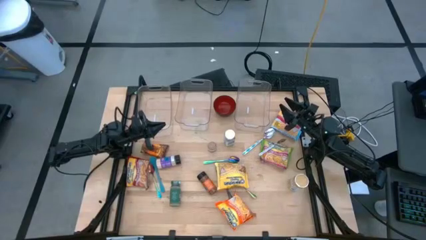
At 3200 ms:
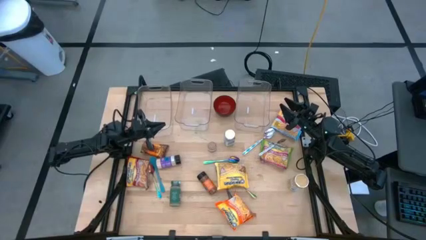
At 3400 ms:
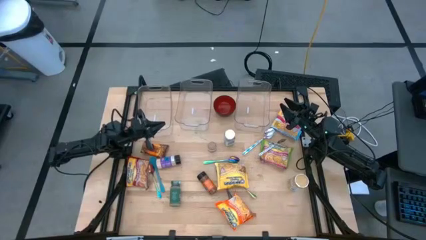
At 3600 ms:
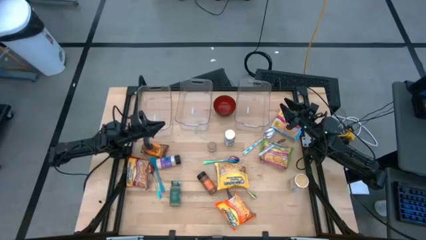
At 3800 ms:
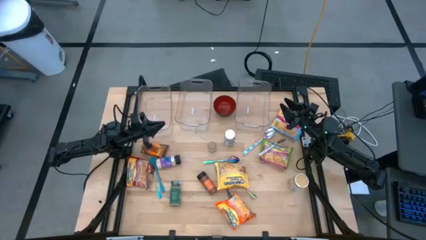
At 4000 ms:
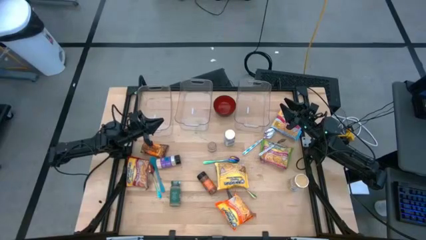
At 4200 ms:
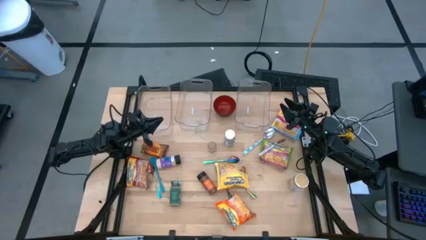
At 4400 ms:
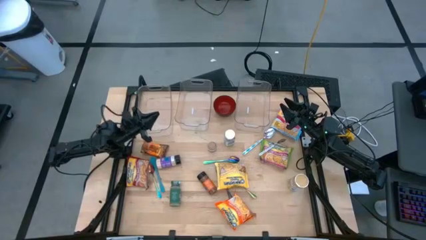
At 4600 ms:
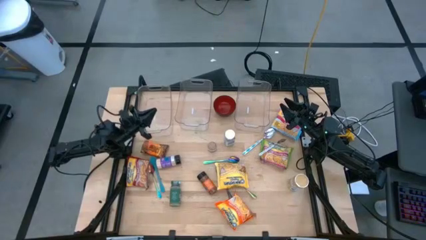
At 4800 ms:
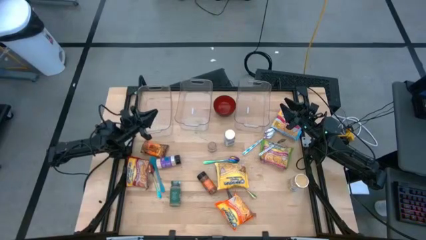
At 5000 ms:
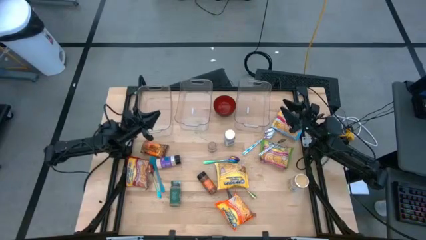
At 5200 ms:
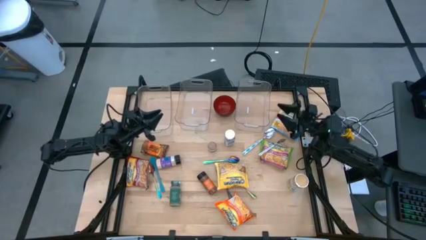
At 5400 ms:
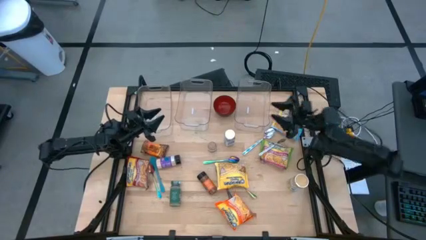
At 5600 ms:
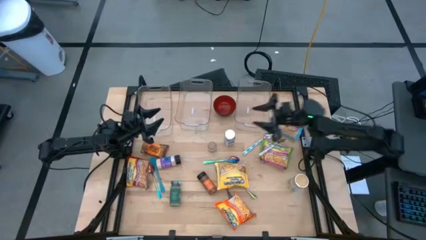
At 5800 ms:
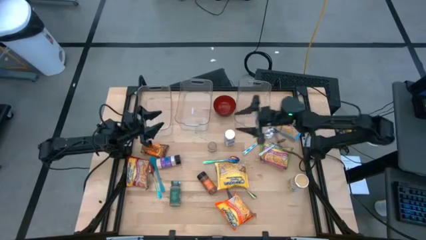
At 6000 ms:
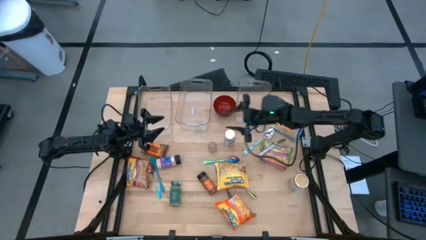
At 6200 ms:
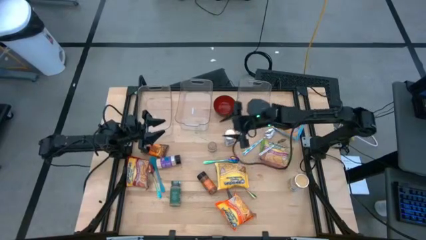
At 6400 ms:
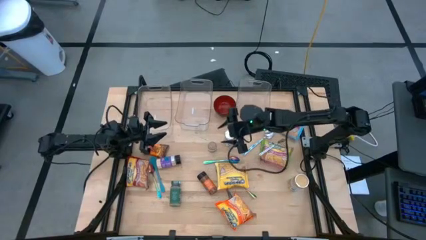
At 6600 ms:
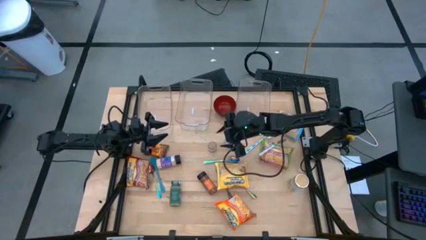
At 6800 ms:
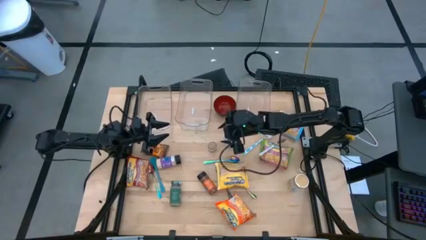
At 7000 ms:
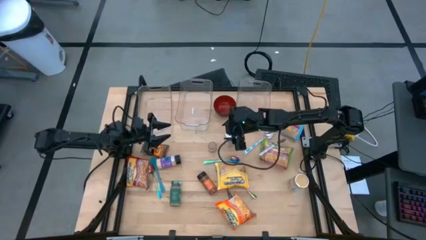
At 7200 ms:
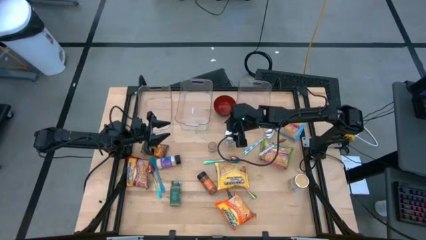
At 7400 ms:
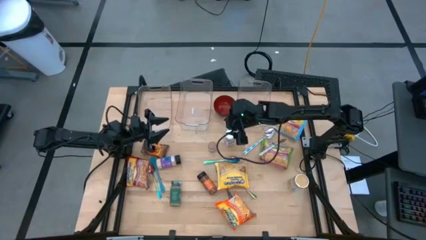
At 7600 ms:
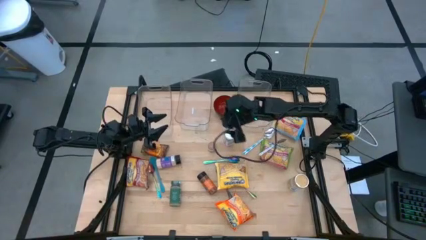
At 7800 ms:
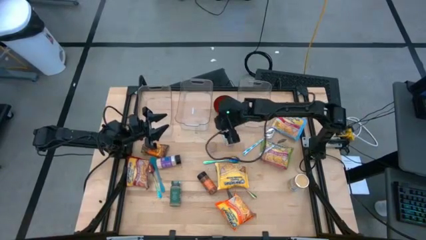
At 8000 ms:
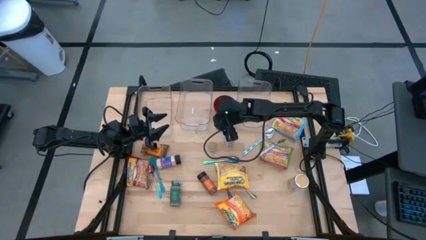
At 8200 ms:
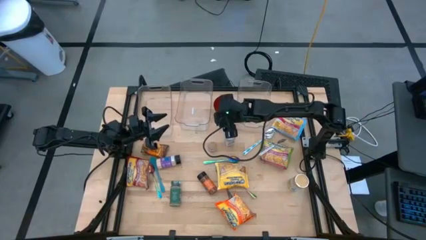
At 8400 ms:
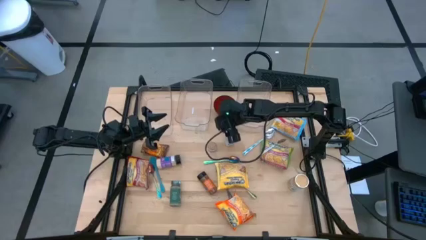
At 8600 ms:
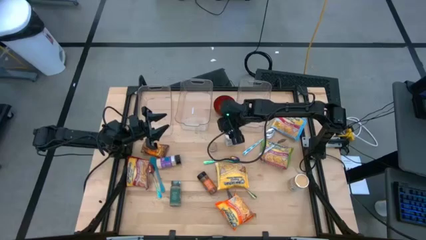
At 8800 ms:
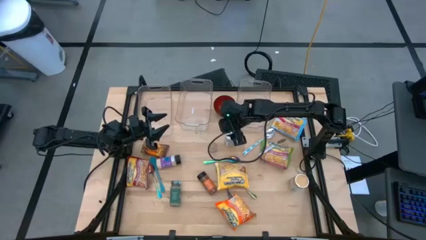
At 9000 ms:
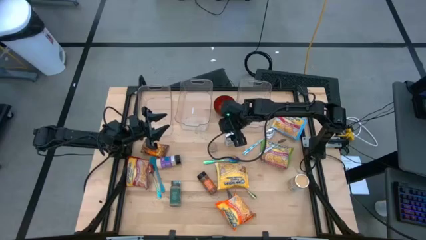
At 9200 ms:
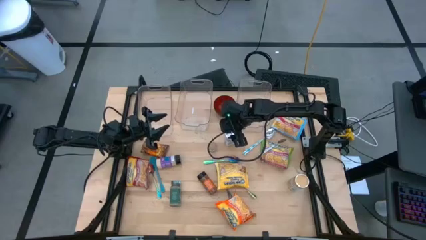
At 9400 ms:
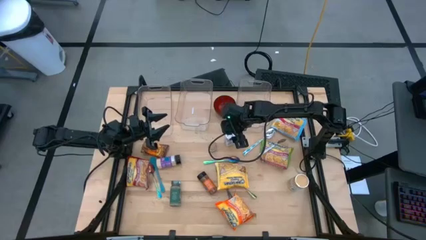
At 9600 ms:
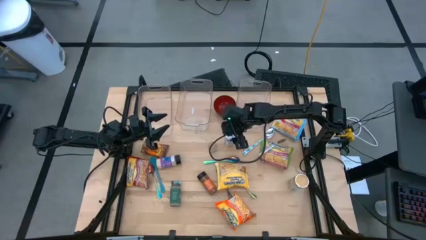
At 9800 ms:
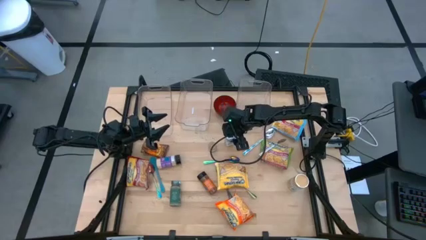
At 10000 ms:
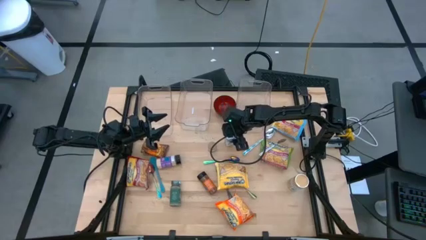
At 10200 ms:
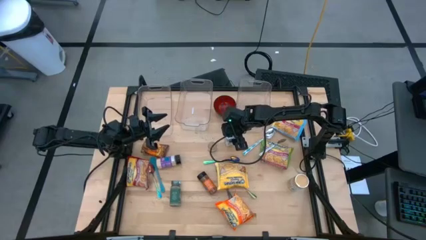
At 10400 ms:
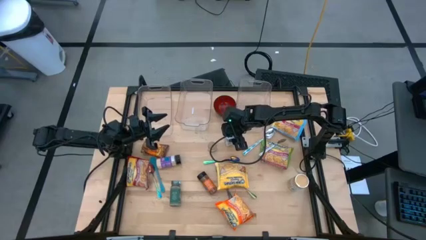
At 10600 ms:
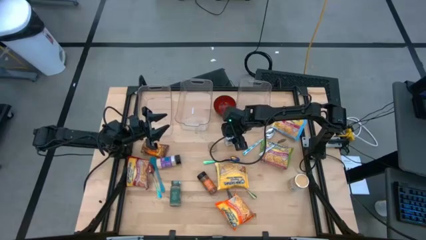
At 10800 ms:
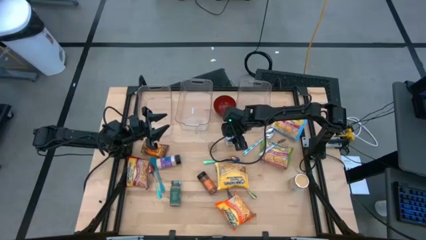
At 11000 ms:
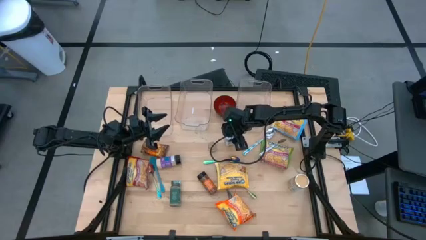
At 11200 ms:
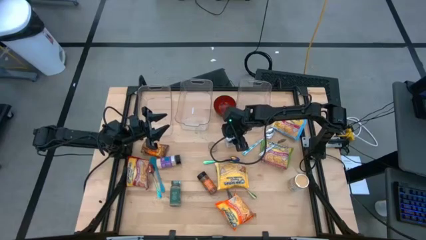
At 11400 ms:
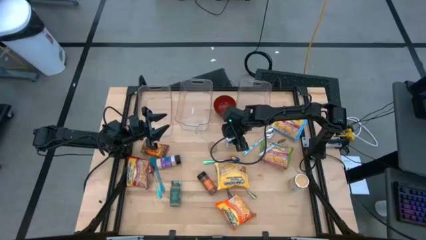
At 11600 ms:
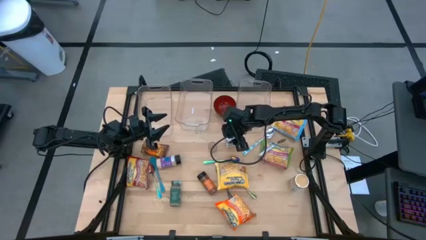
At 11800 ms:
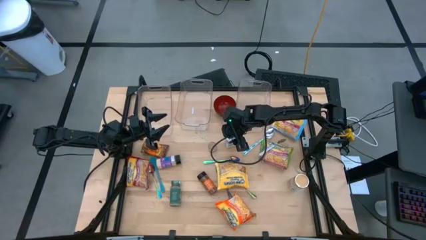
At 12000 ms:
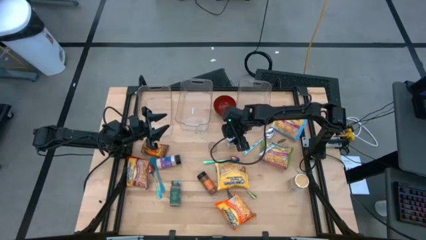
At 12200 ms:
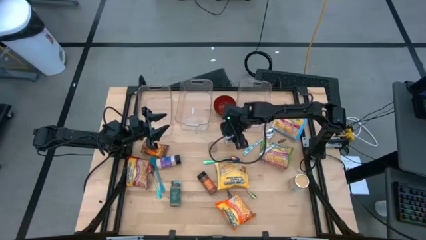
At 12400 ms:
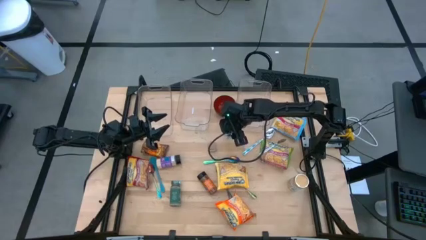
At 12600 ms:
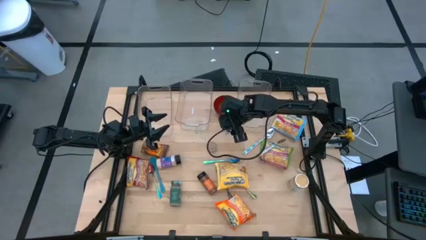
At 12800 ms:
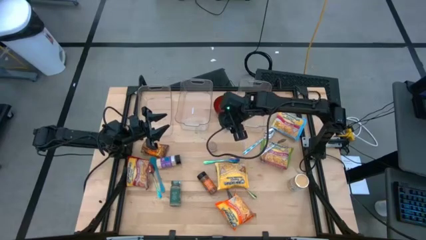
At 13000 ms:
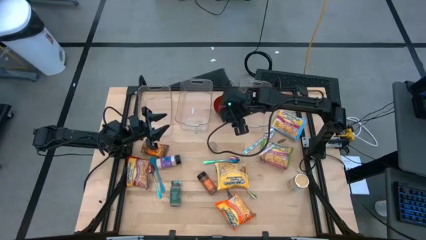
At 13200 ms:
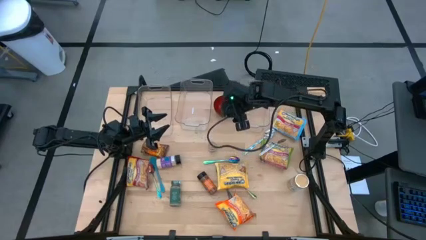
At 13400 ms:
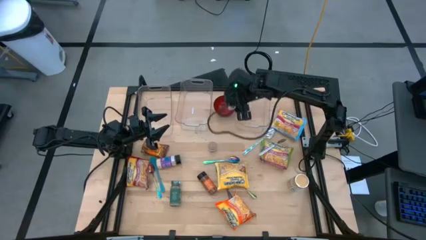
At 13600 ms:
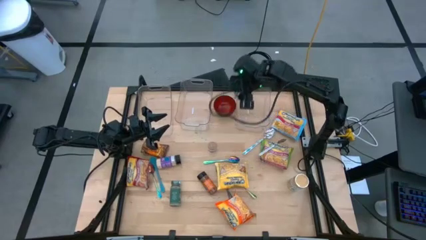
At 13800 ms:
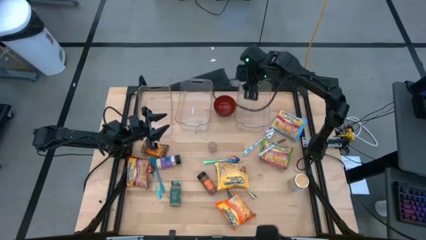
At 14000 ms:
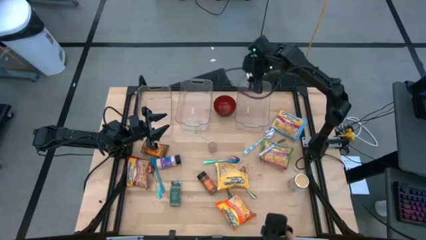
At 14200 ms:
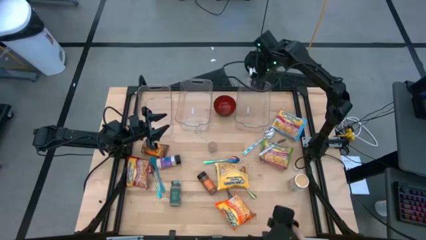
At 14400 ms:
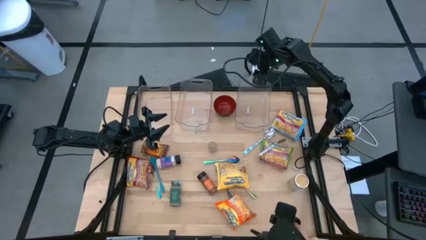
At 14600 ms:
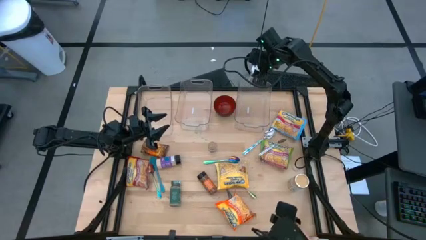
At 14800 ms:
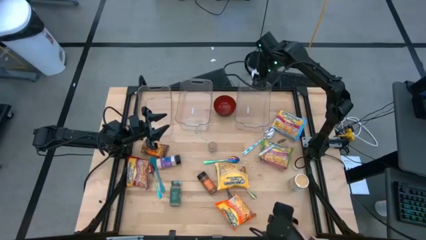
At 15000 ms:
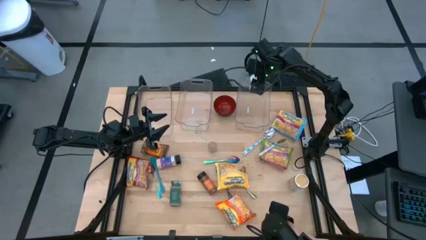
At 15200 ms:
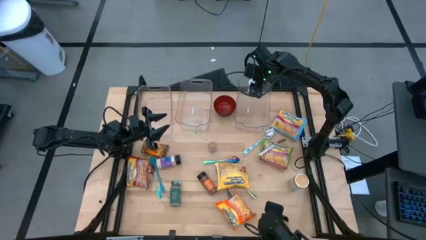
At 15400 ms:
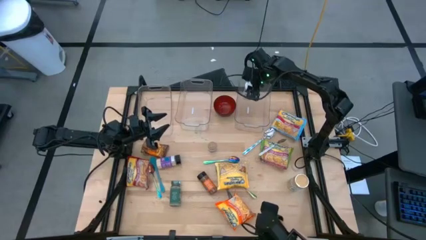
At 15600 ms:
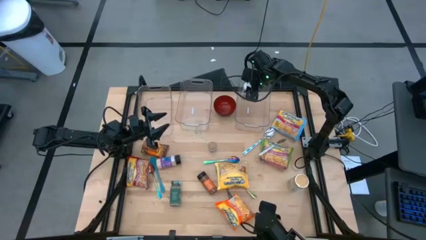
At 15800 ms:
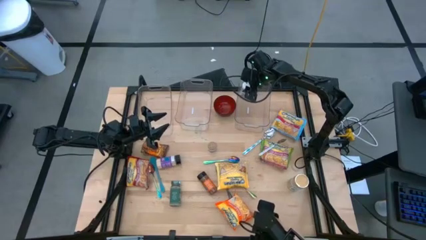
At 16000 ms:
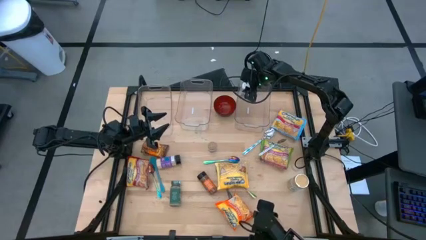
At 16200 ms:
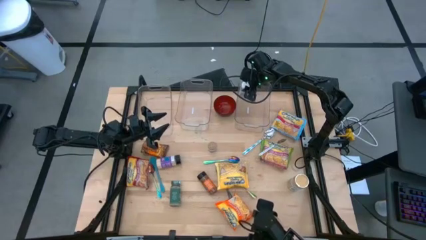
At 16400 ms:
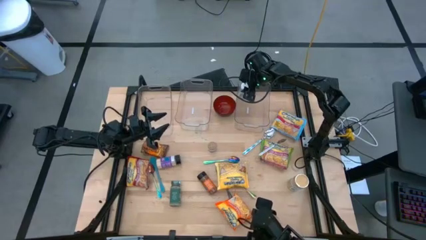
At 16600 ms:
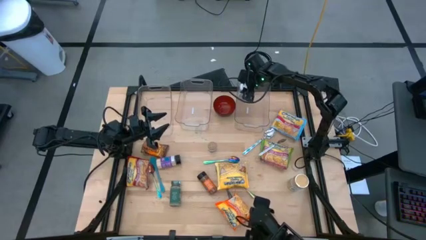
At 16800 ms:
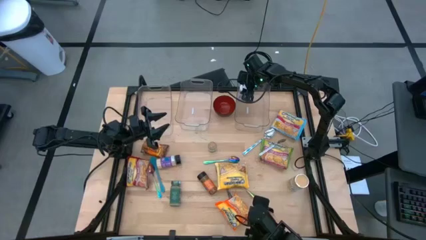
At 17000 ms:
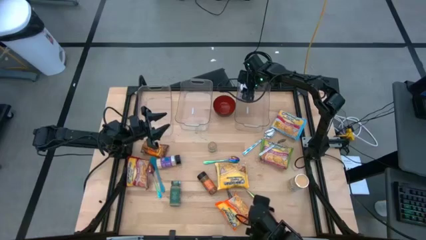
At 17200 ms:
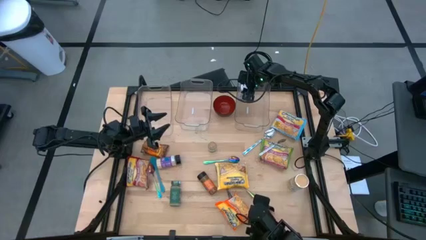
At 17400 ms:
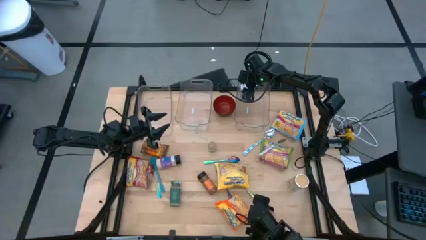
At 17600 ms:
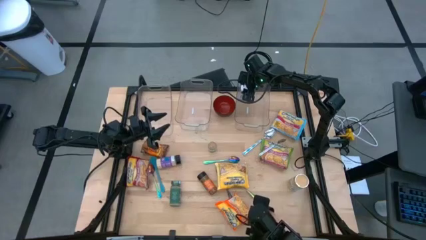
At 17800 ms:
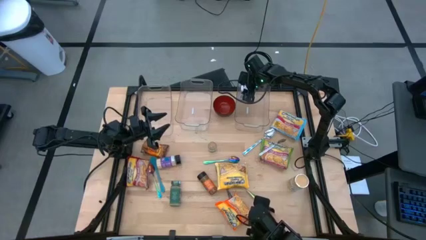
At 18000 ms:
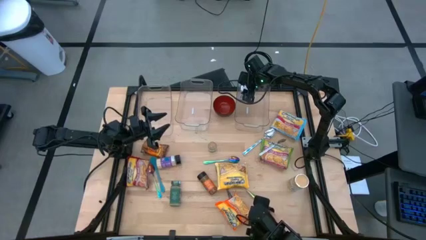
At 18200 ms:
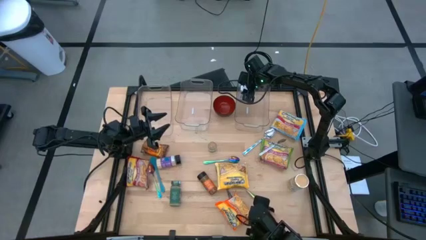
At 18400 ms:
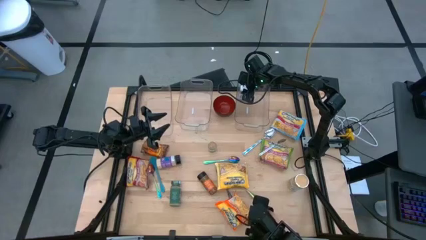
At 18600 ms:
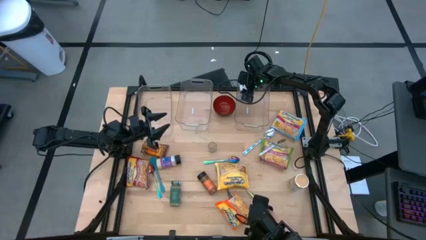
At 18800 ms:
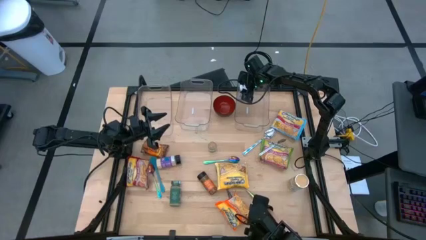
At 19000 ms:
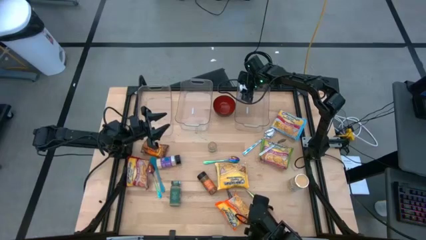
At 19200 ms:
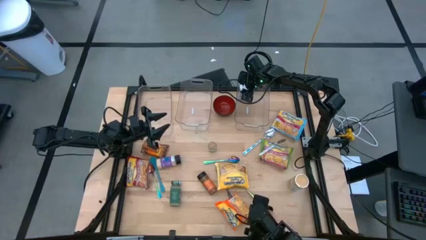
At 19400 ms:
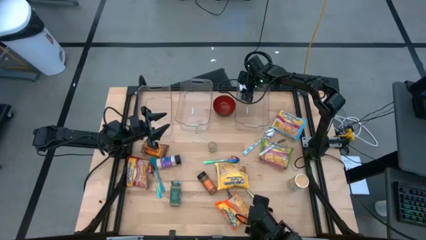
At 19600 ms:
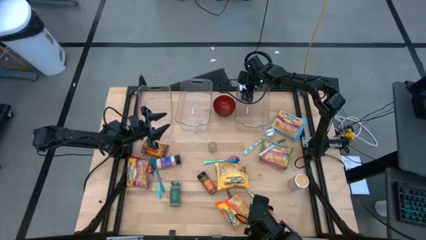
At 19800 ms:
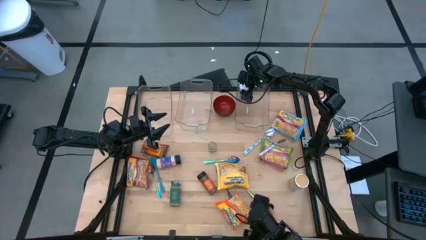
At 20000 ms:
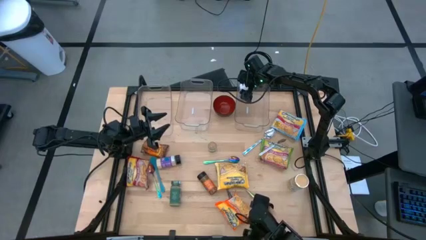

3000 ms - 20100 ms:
Task: Pick & Place Food Item
Put the white seasoning bottle into the right transparent bin
